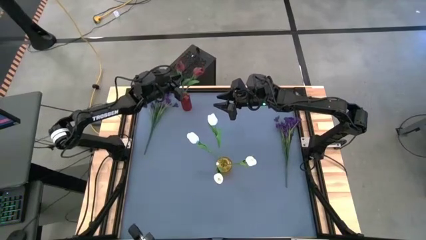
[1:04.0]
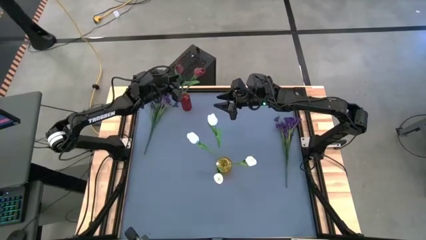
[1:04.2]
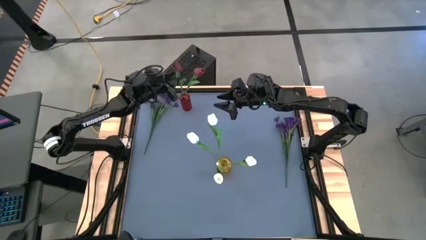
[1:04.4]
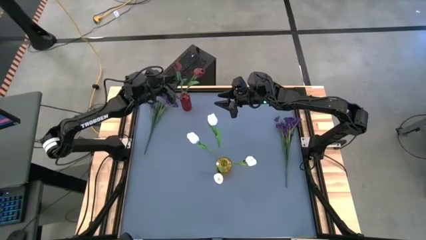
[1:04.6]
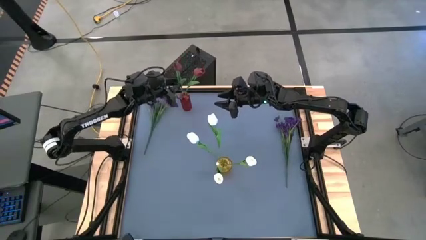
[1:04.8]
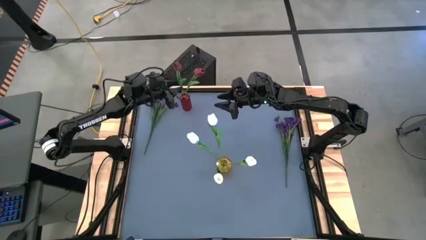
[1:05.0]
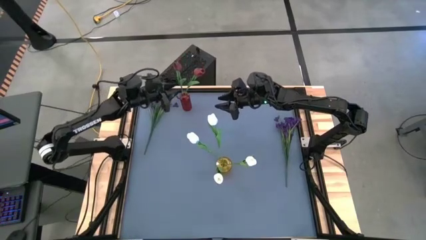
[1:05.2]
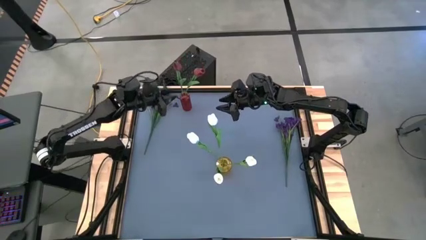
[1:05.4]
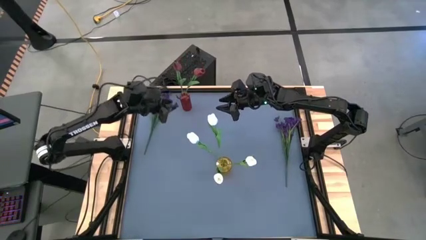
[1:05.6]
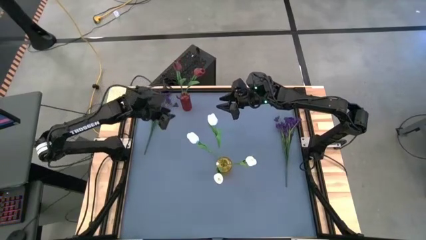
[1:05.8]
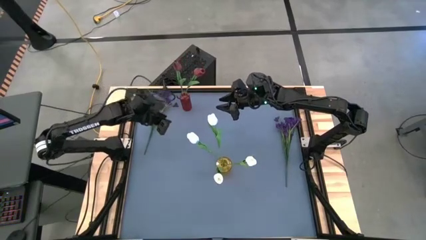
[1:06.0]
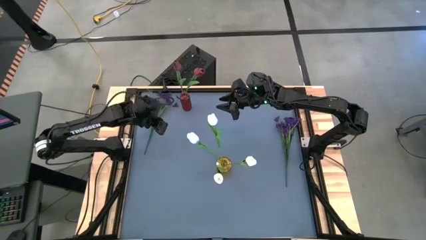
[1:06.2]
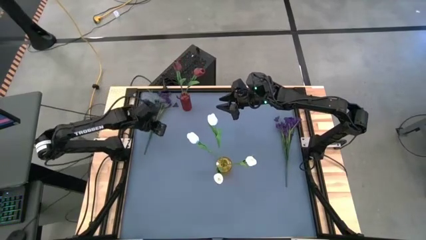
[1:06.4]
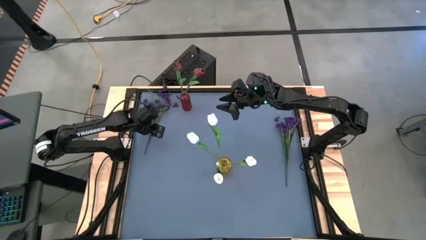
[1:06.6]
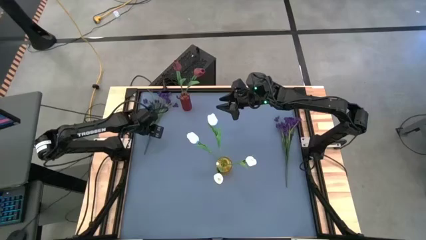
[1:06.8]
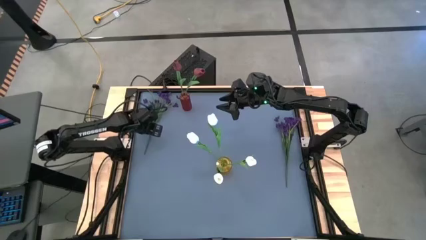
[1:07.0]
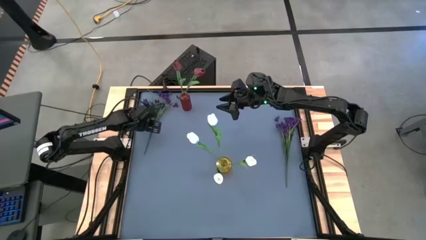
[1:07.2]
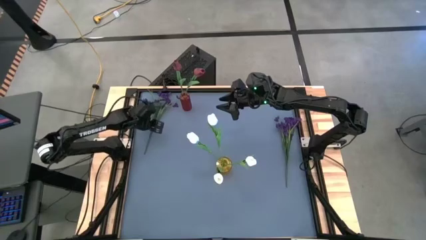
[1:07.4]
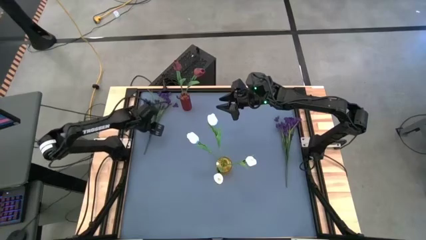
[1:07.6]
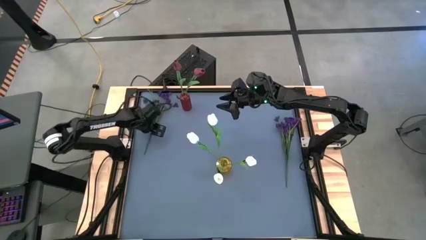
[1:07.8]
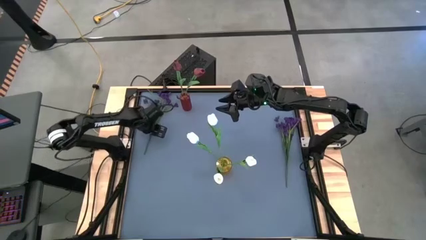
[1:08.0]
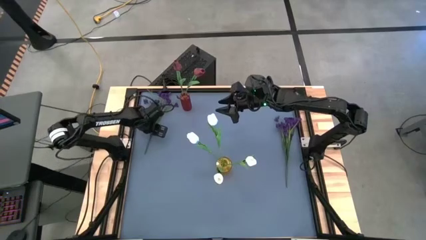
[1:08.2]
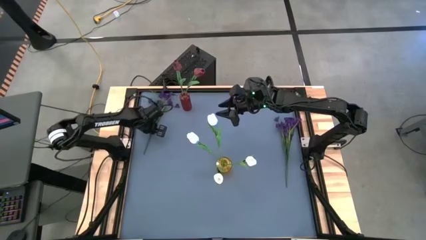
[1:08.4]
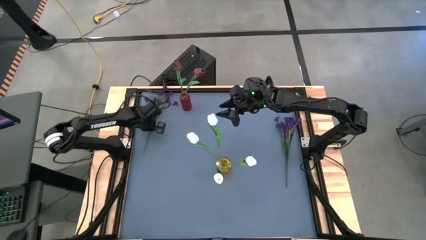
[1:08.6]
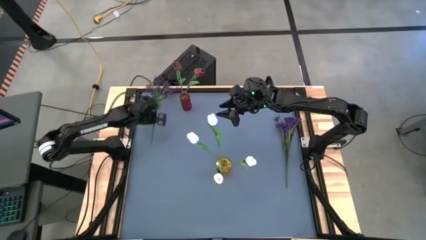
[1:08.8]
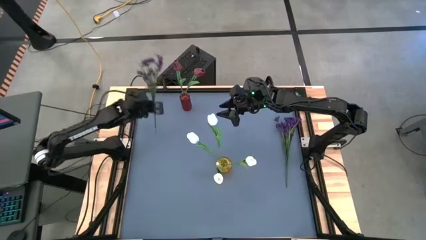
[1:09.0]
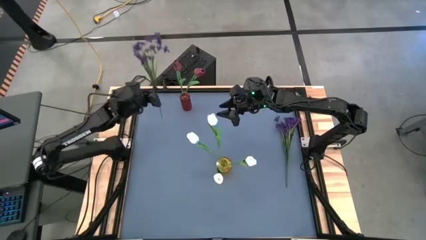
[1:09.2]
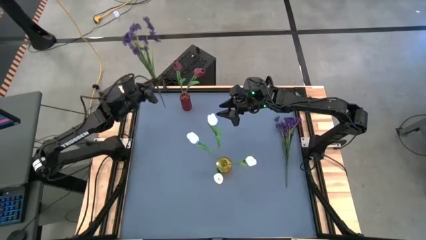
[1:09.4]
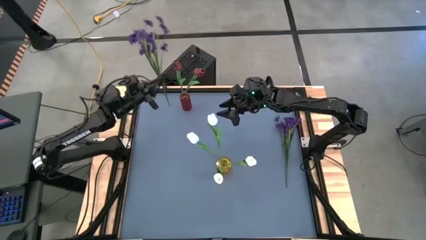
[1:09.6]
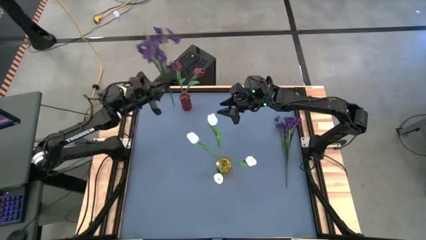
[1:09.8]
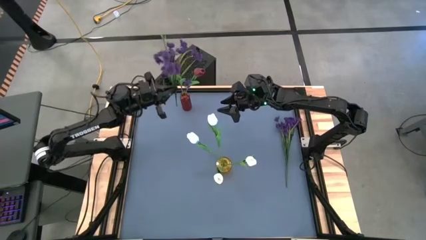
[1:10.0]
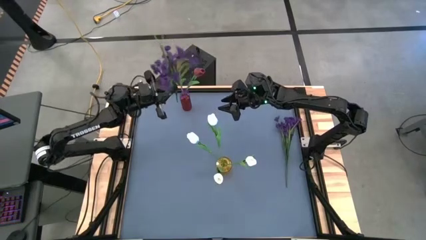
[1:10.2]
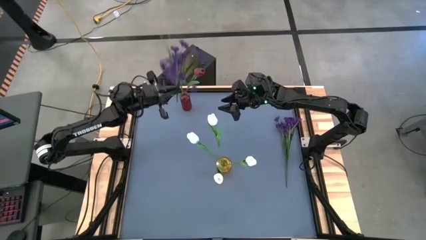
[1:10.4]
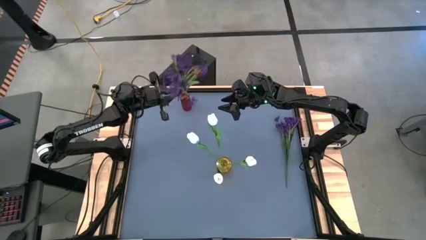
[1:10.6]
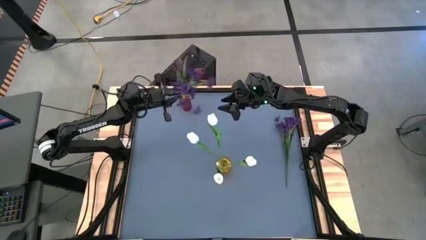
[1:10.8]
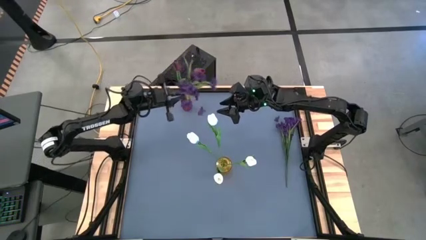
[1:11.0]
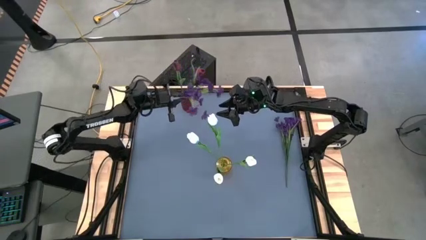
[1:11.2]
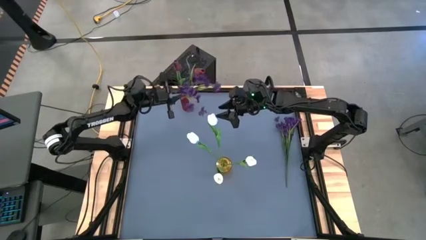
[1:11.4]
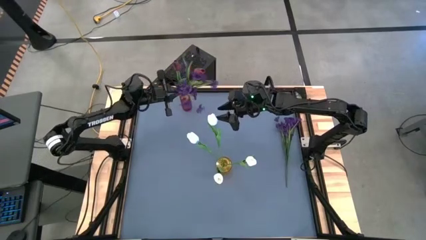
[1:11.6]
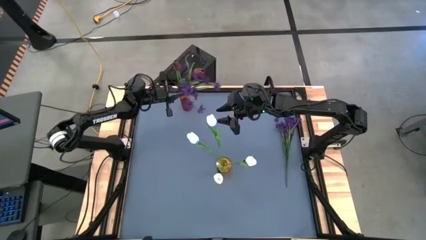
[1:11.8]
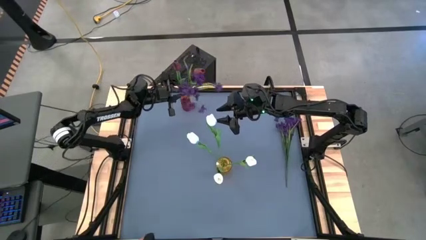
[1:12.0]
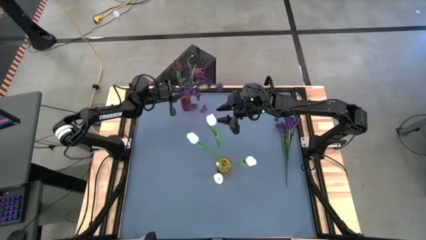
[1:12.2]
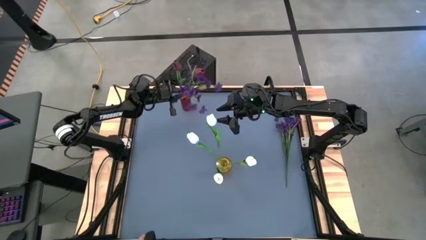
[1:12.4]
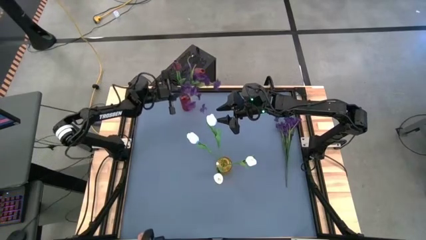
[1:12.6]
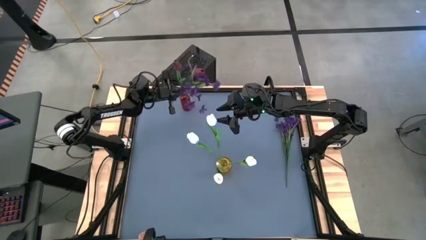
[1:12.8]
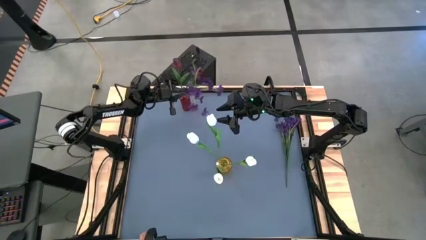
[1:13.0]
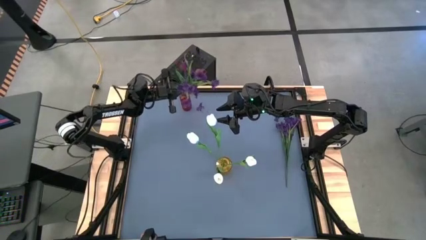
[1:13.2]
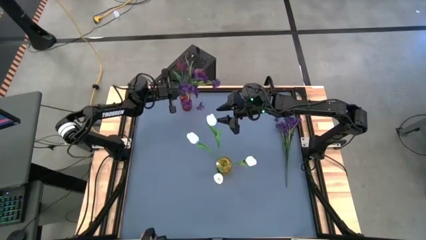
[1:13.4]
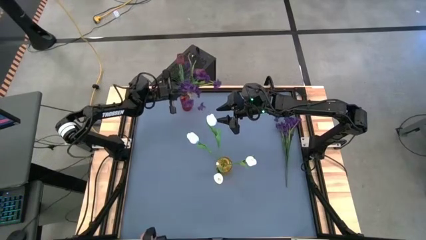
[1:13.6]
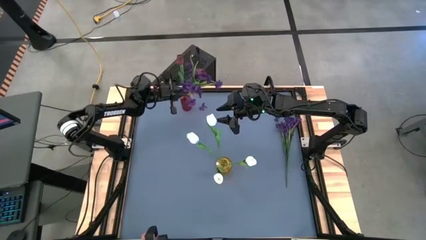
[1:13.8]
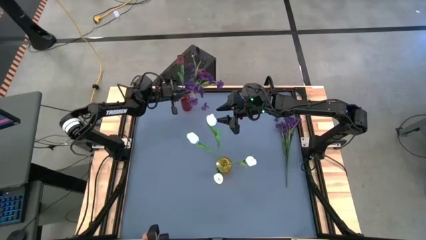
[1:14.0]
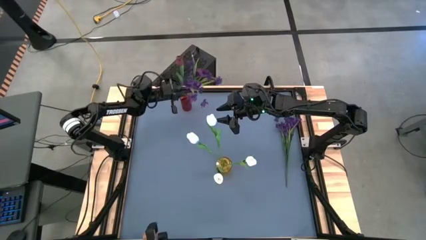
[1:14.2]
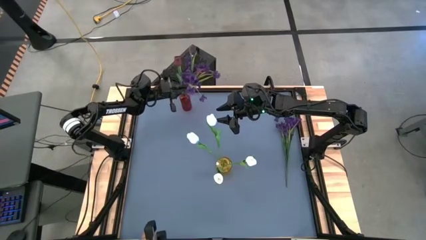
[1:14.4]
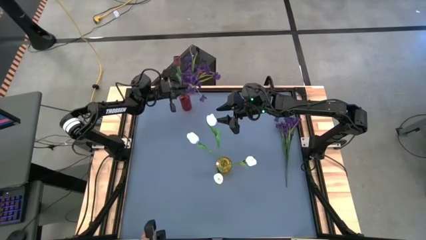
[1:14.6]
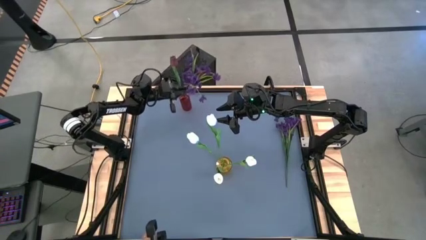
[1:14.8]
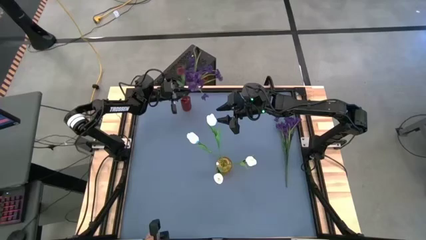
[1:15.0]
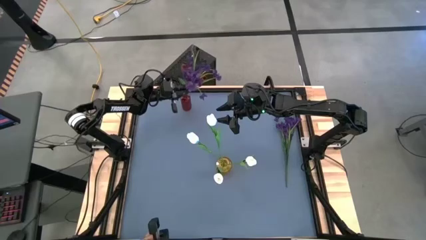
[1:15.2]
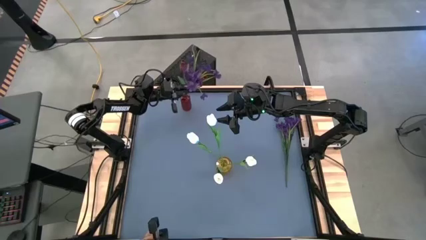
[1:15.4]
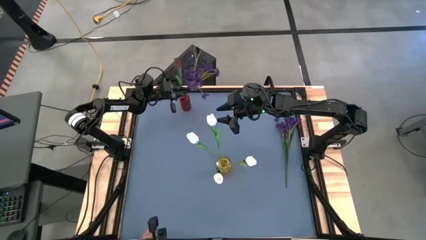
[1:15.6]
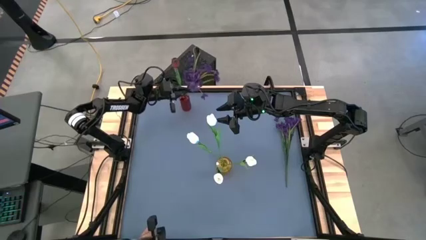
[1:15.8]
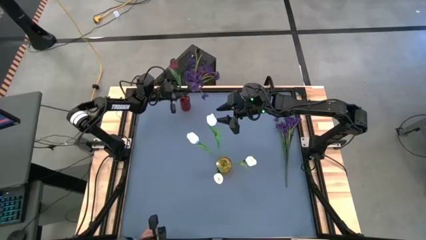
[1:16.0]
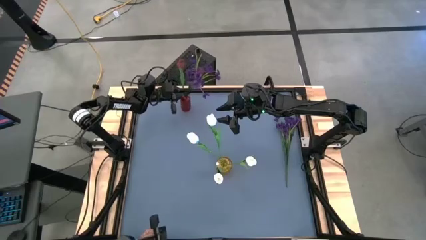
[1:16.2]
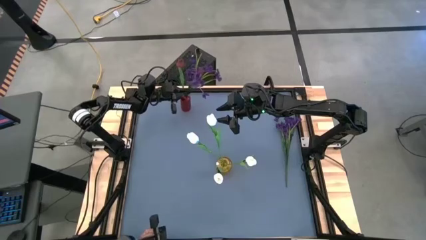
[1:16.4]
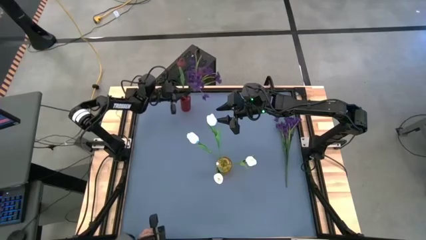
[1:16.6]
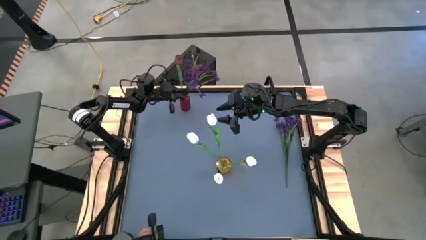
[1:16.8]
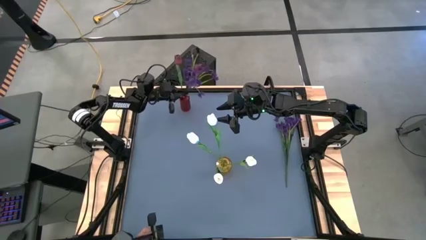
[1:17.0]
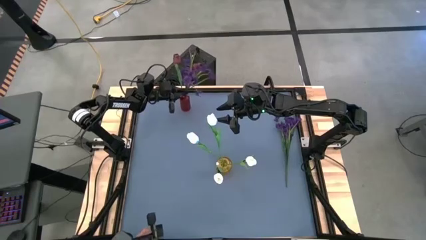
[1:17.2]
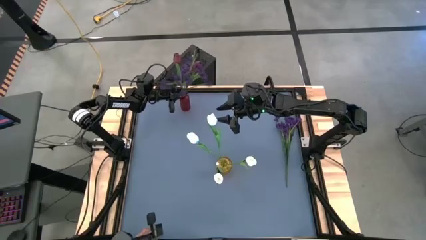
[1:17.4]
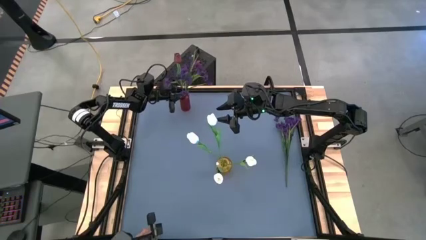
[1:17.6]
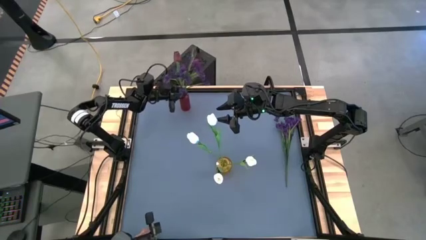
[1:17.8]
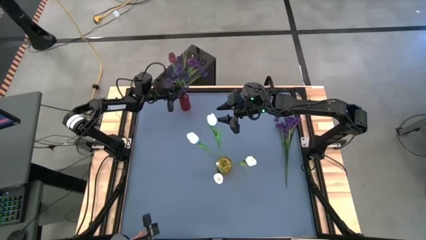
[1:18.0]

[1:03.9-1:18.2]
Task: Sort flowers into vase by color
Put the violet flowers into the red vase
